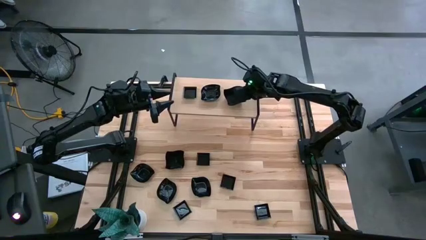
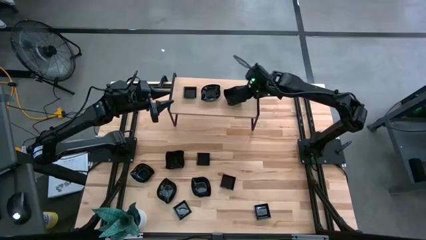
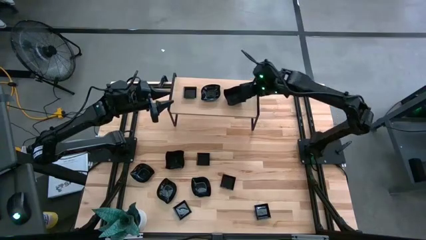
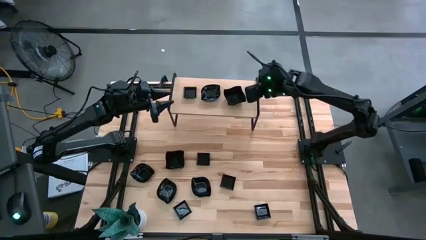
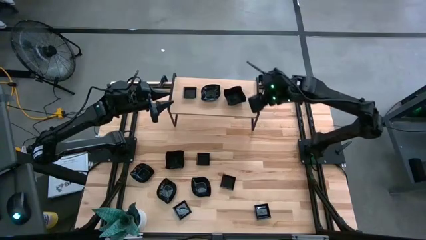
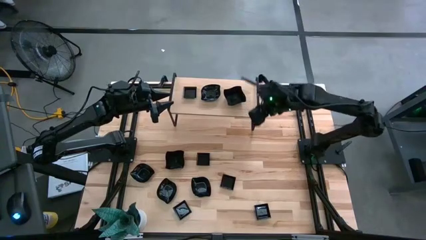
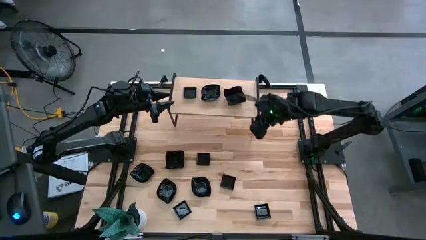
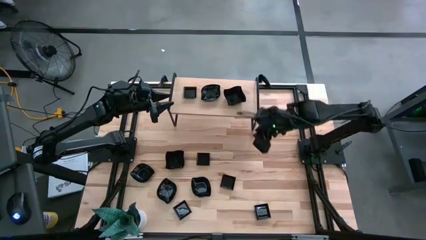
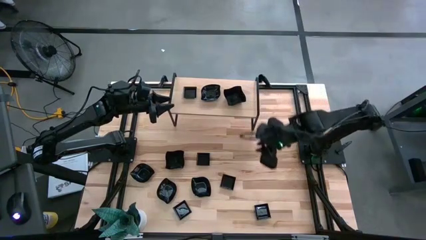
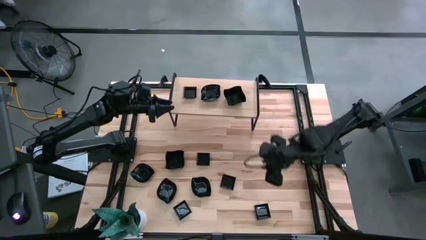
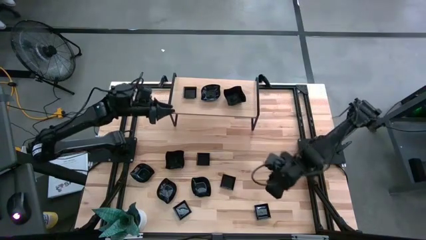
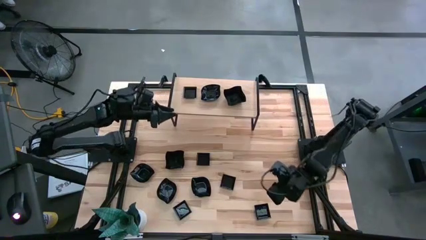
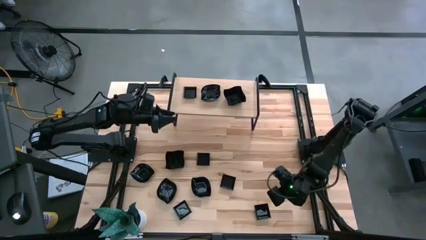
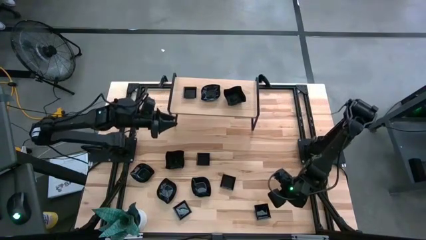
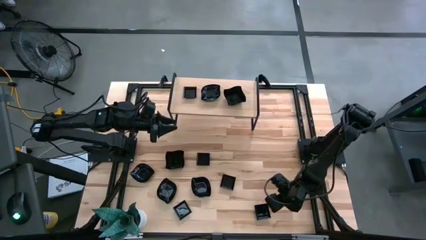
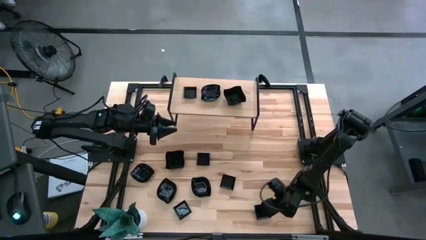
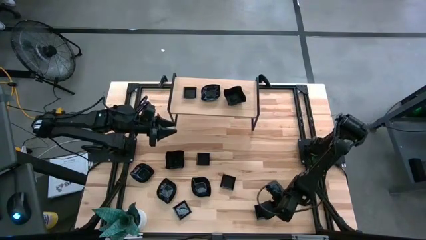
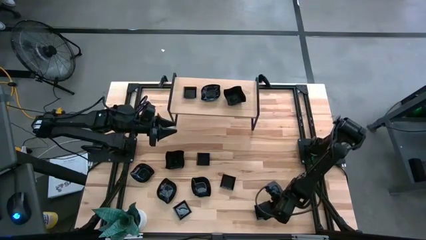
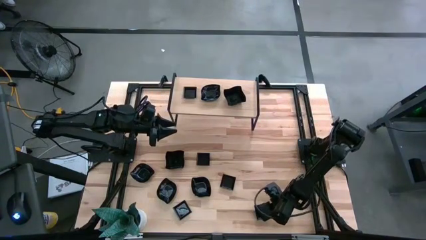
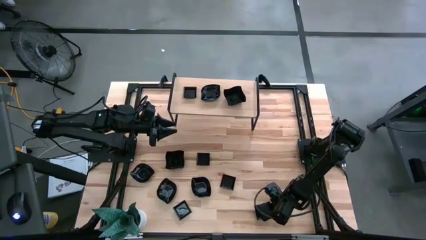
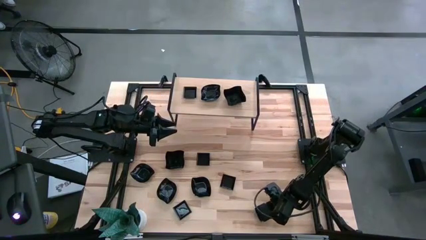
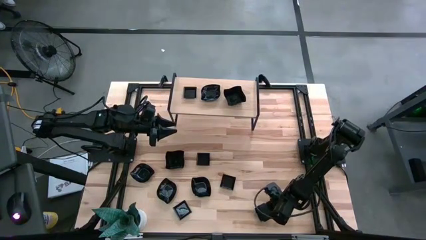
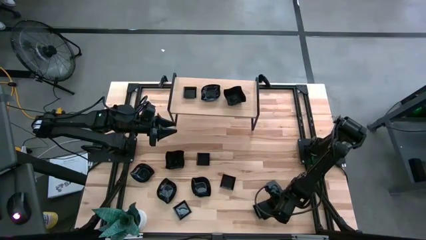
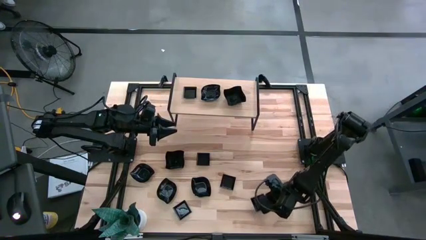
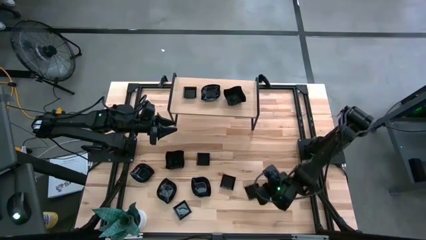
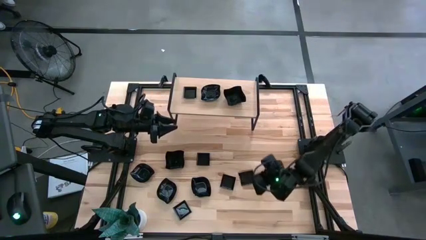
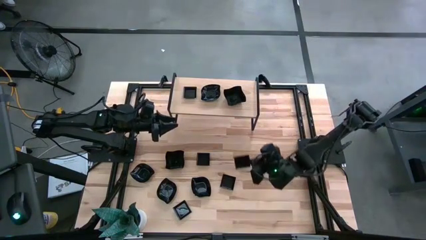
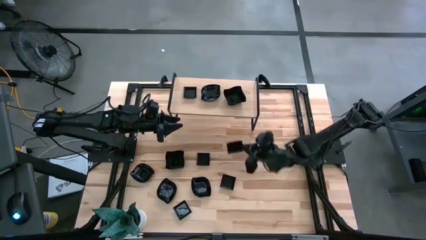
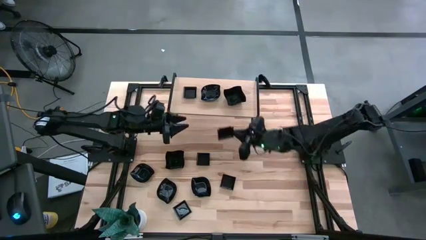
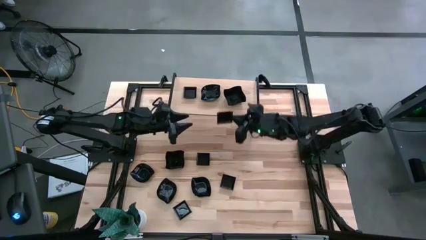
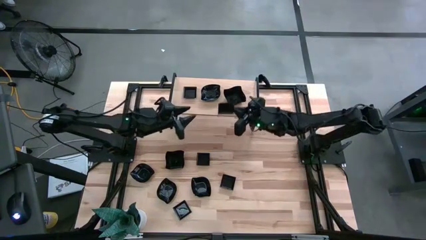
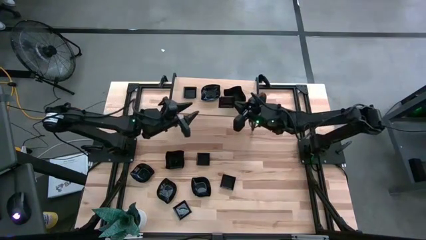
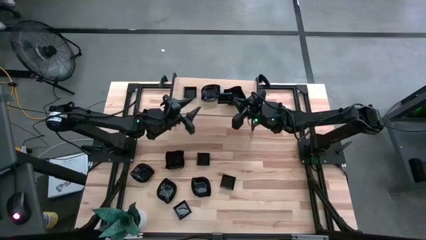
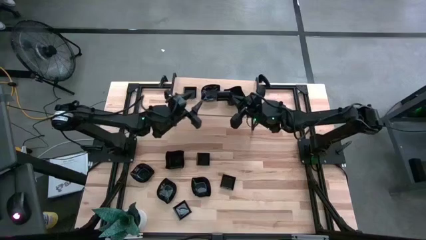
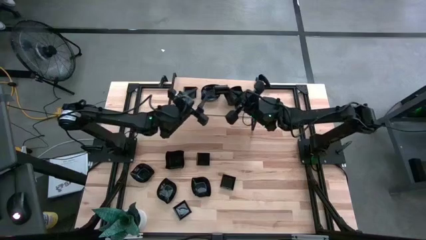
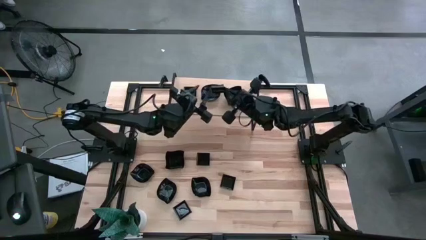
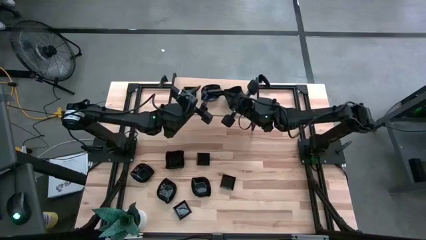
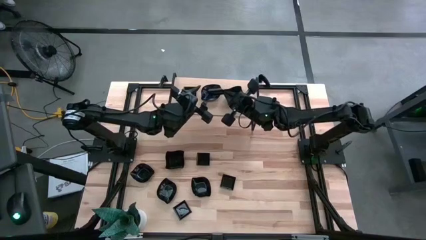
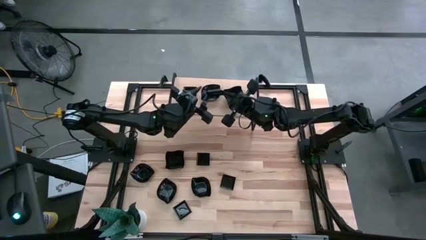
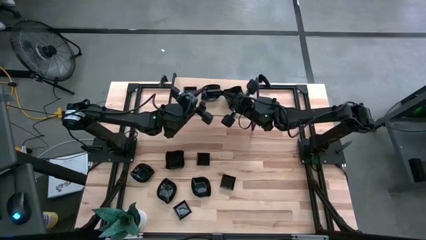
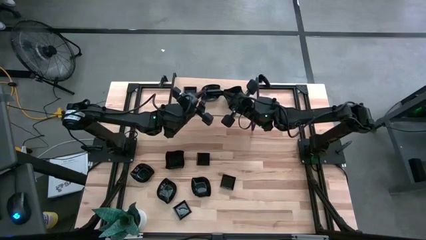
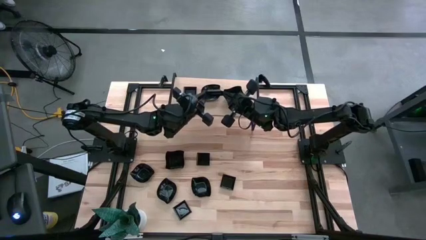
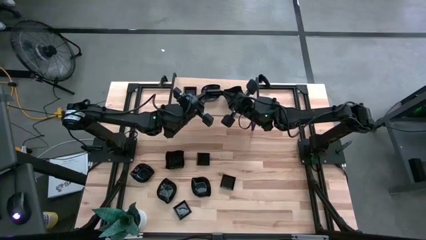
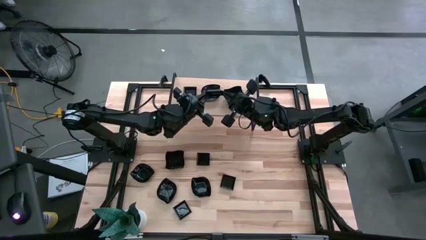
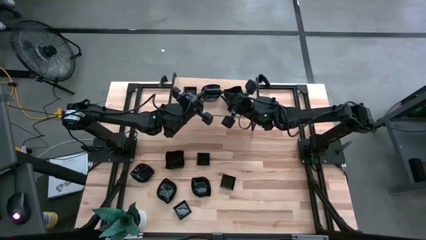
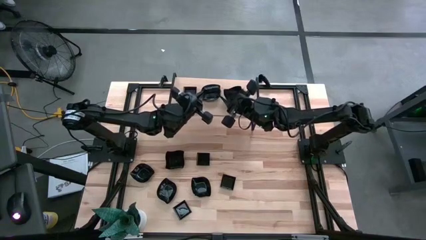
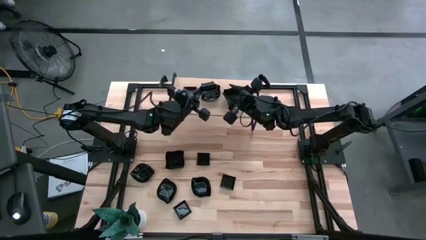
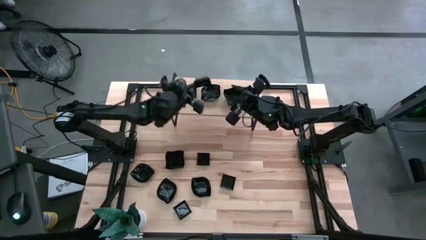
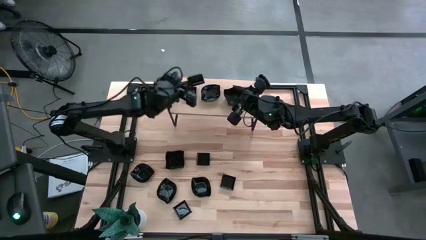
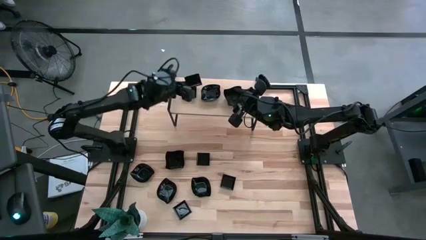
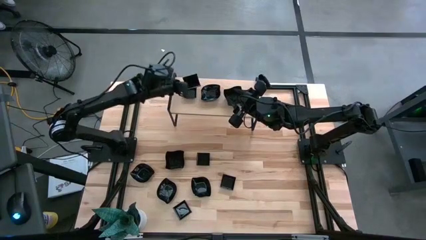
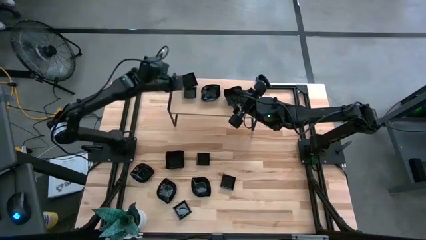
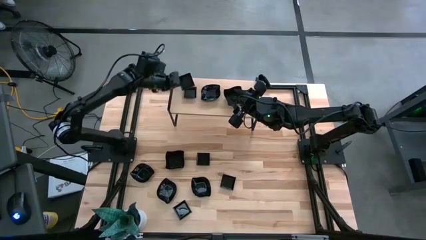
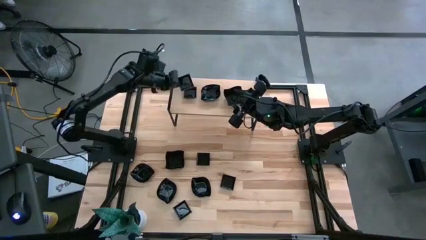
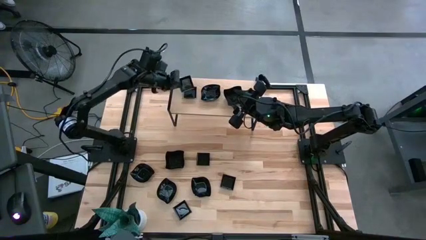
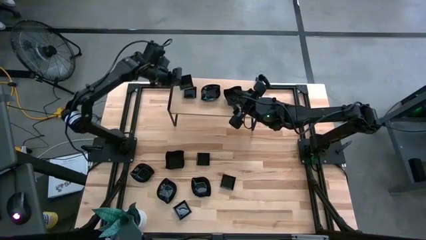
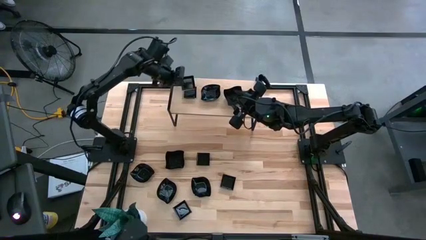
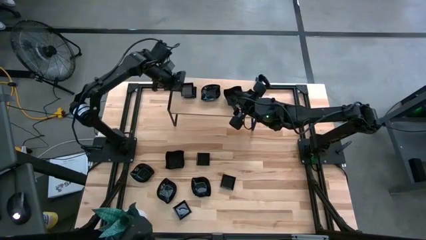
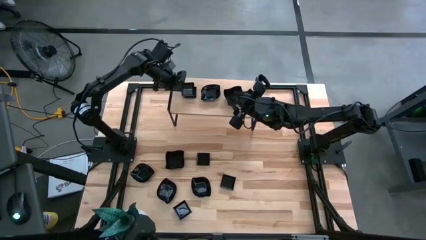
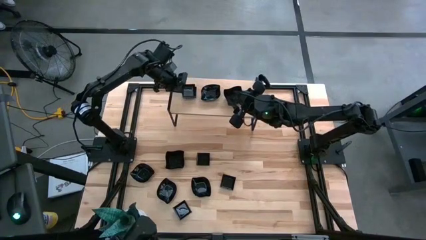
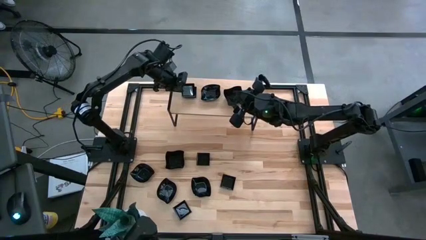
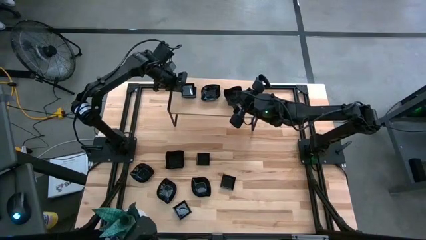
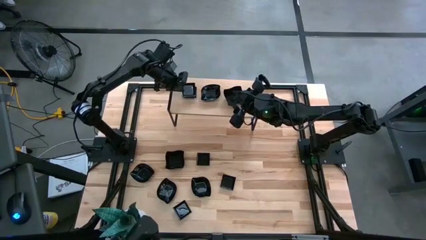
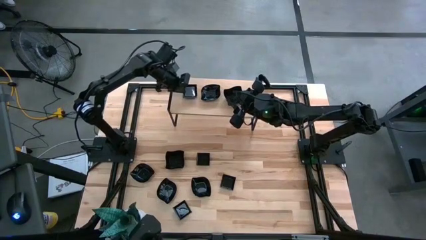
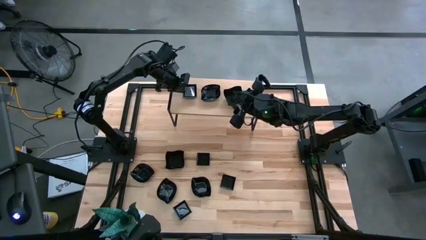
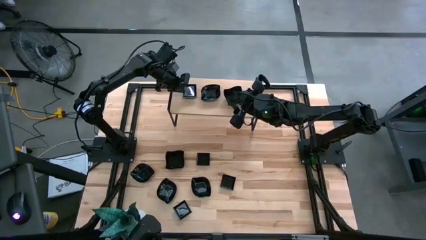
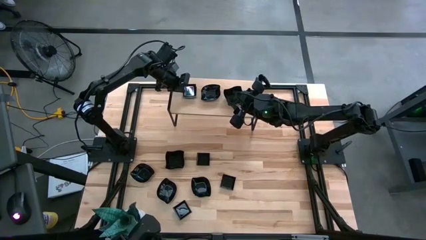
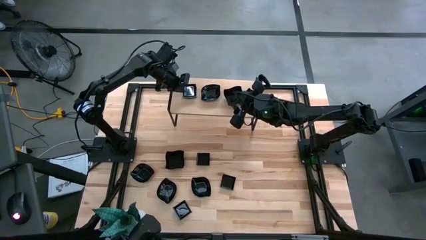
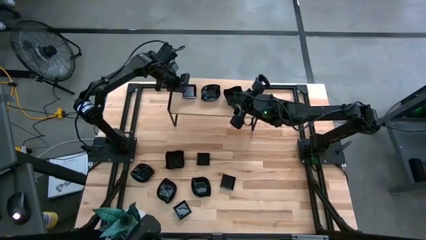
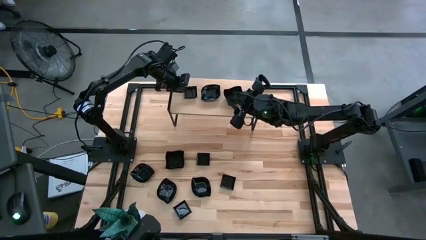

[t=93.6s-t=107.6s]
Task: Pick & Place Mini shaped plates
Stack the square-shaped plate on the square-shaped plate
